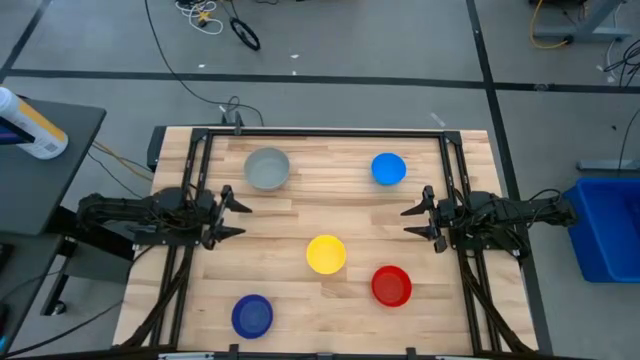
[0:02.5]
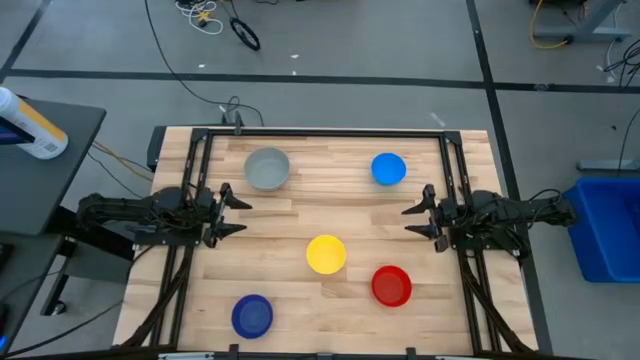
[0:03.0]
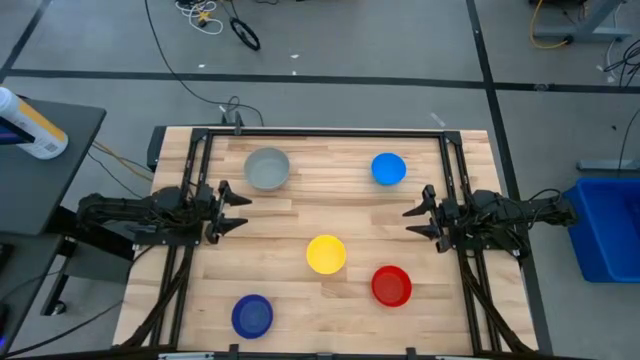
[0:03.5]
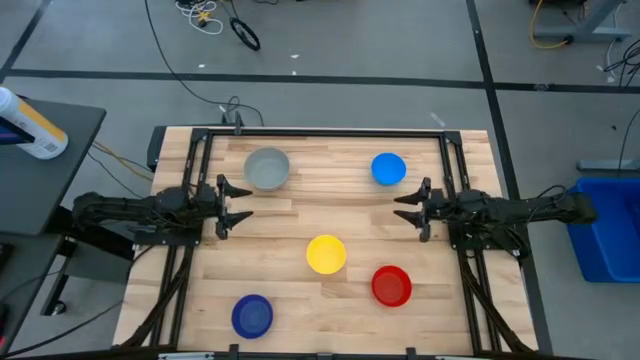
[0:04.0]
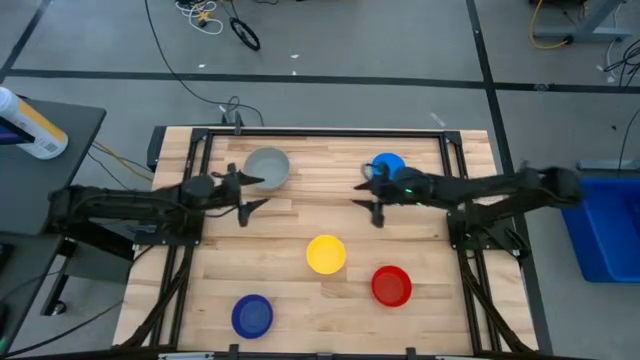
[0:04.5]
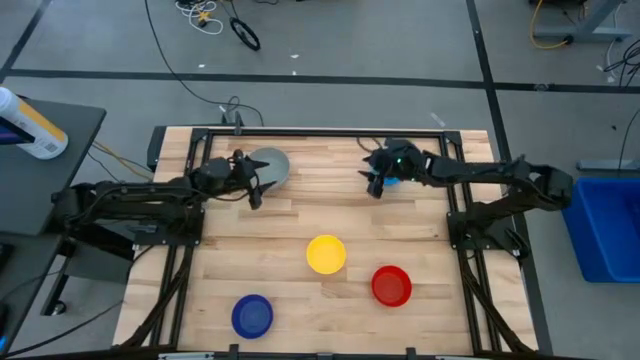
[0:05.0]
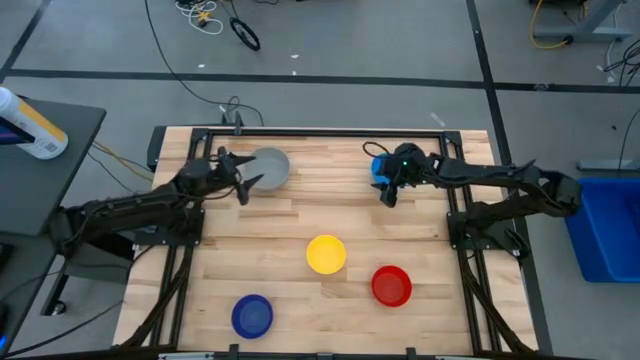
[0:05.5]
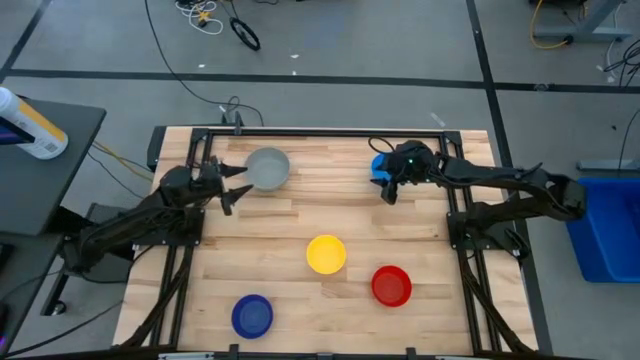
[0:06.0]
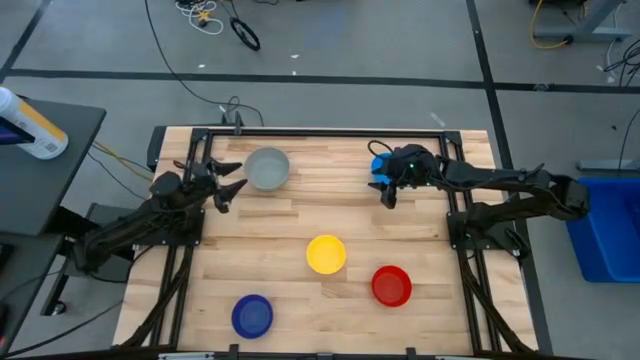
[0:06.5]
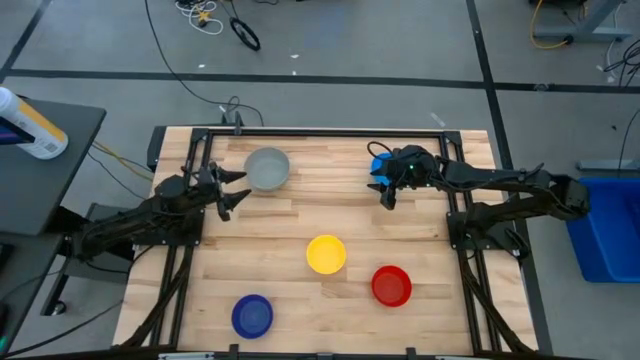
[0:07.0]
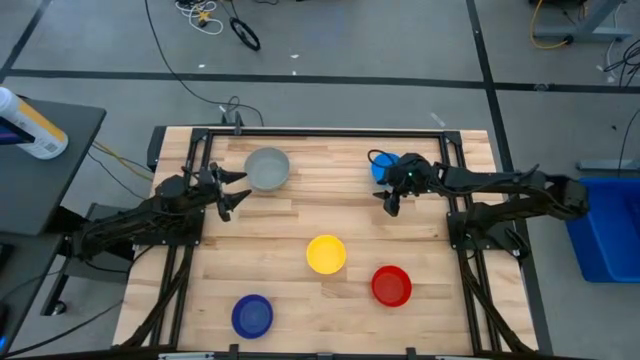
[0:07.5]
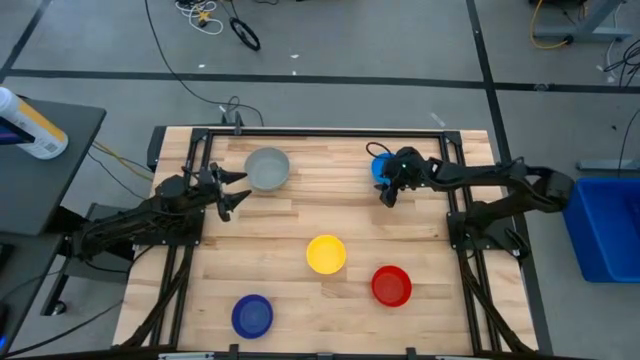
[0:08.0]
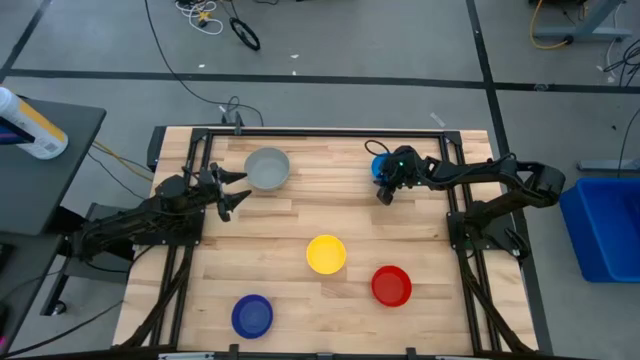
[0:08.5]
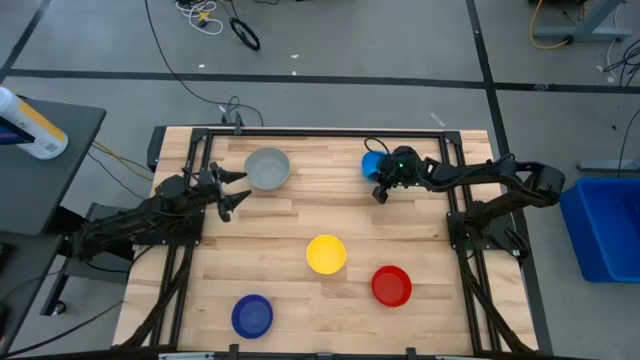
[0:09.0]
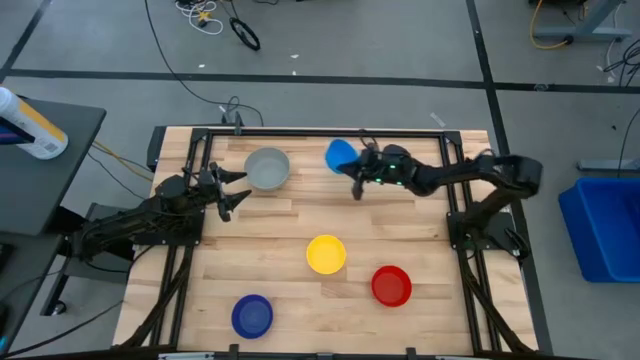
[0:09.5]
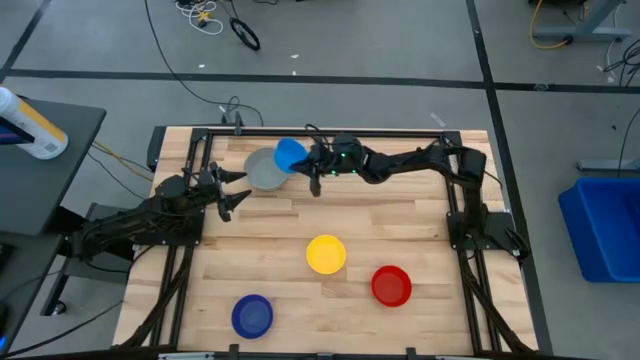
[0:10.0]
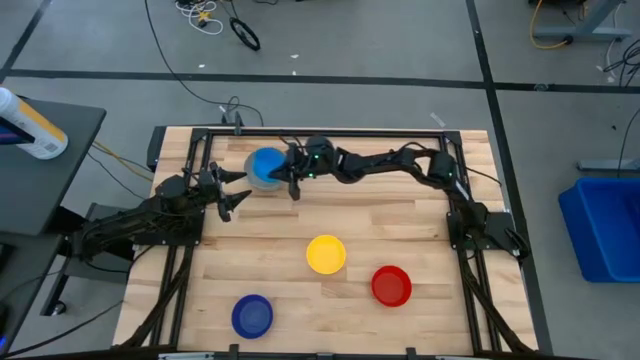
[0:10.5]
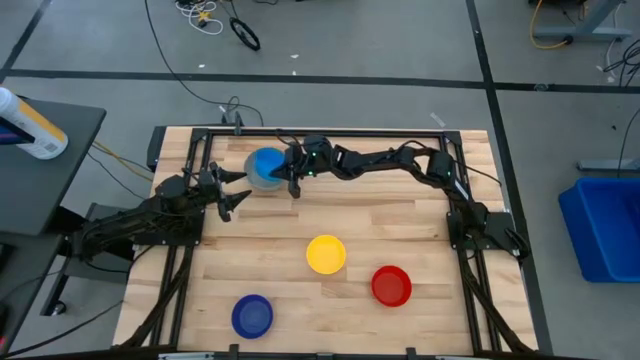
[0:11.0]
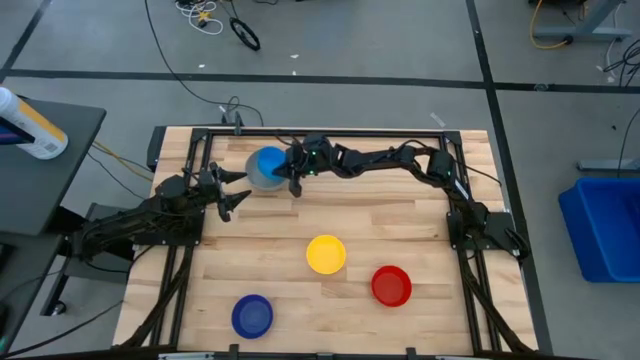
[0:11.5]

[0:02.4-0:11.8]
Stack the light blue bowl on the gray bowl

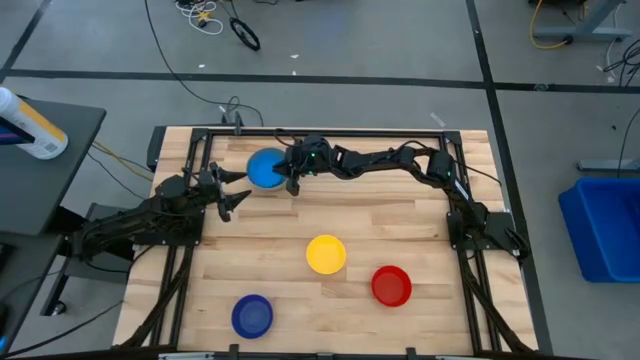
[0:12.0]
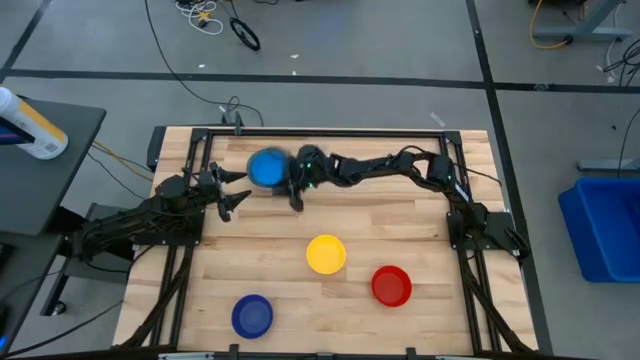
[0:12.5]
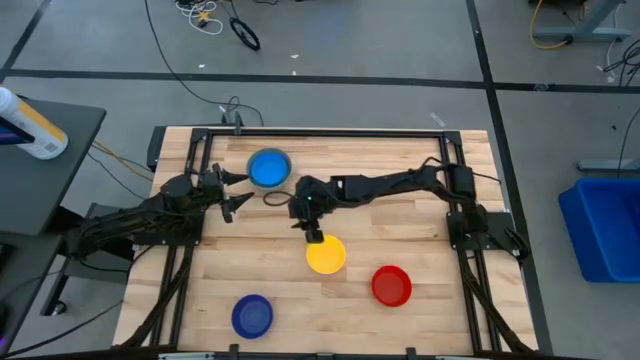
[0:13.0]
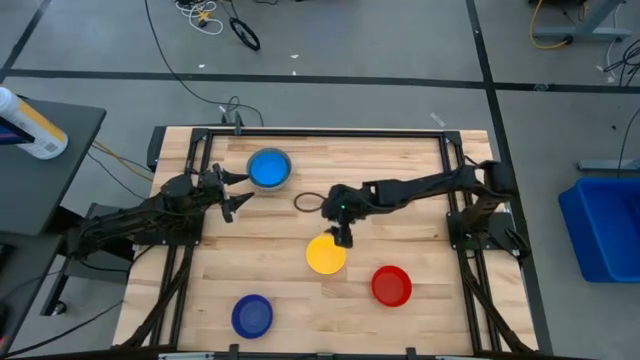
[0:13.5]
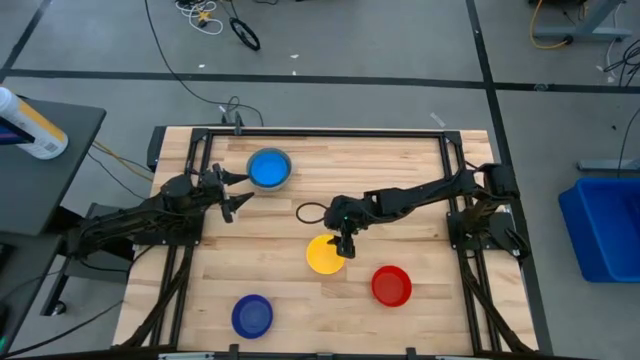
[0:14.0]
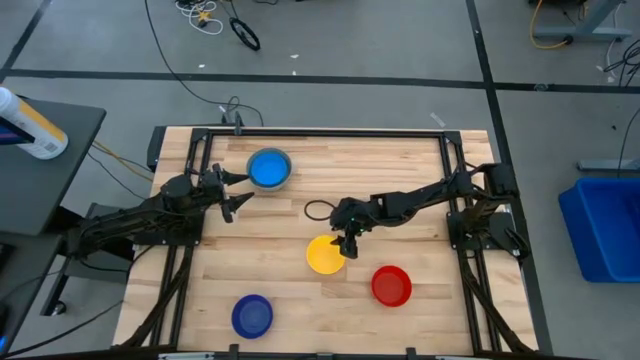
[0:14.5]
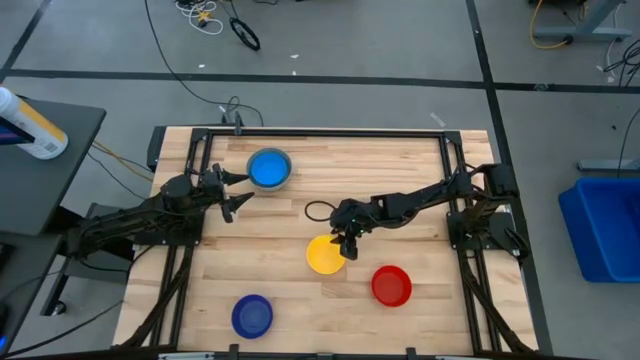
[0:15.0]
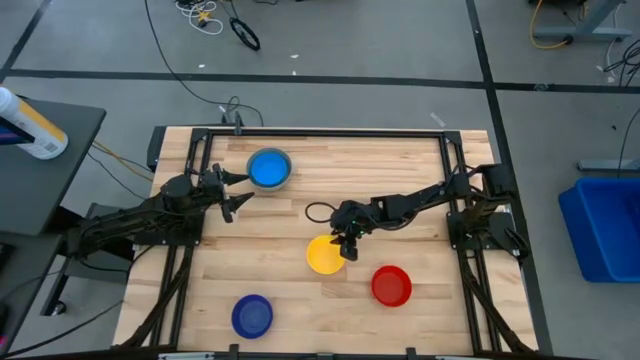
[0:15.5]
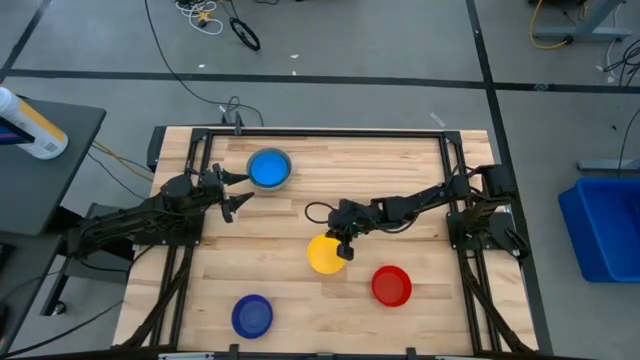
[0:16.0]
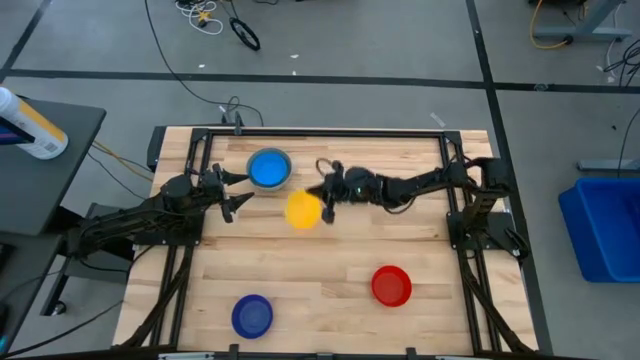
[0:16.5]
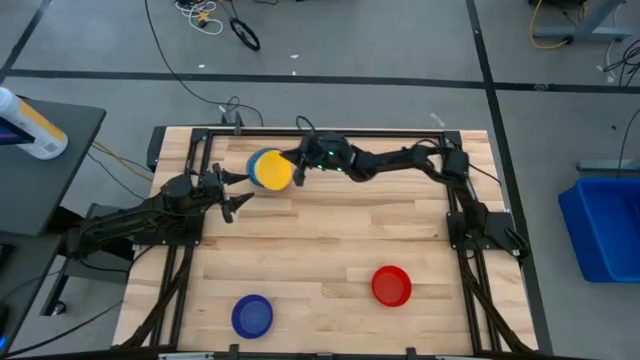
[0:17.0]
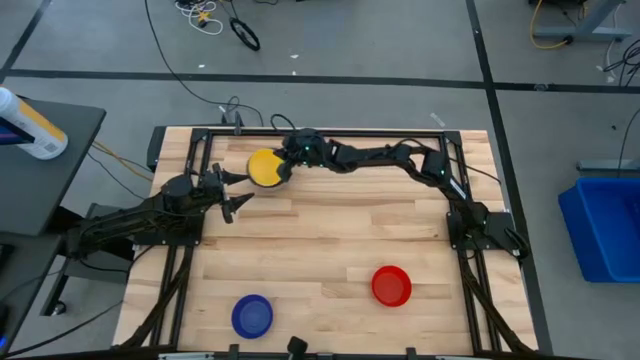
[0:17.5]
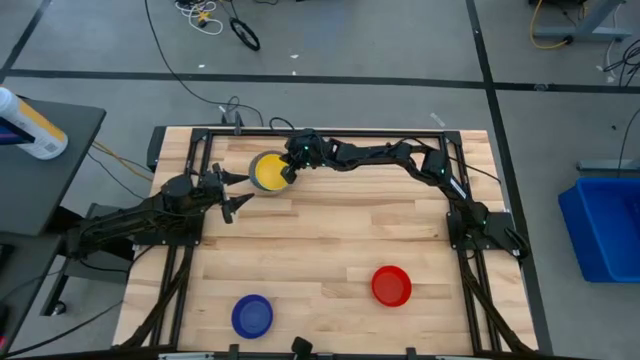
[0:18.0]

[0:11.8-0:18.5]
Stack the yellow bowl on the light blue bowl

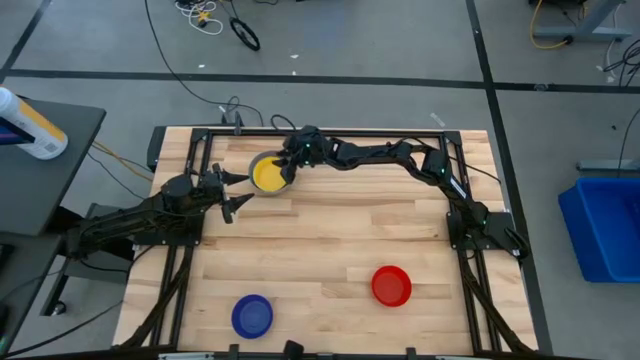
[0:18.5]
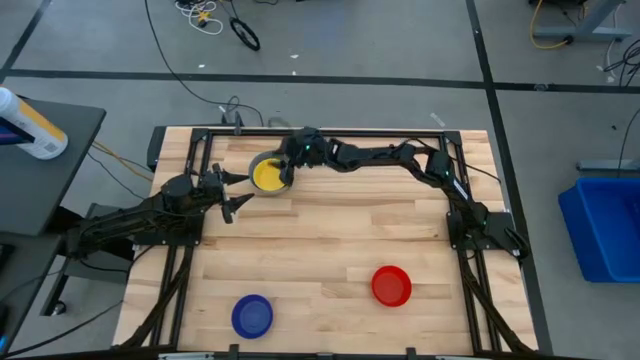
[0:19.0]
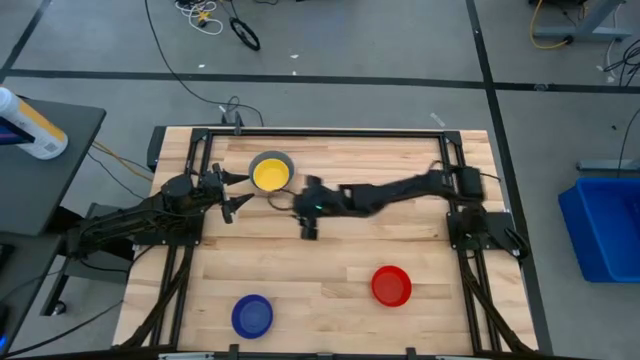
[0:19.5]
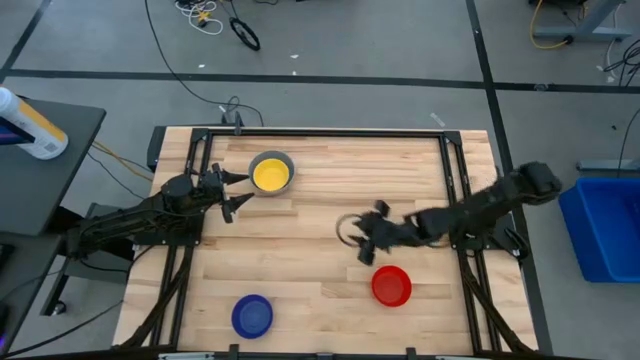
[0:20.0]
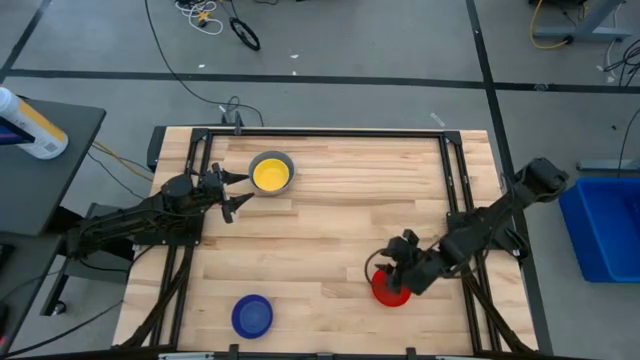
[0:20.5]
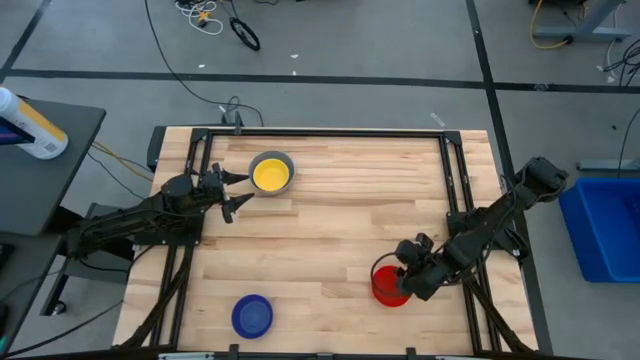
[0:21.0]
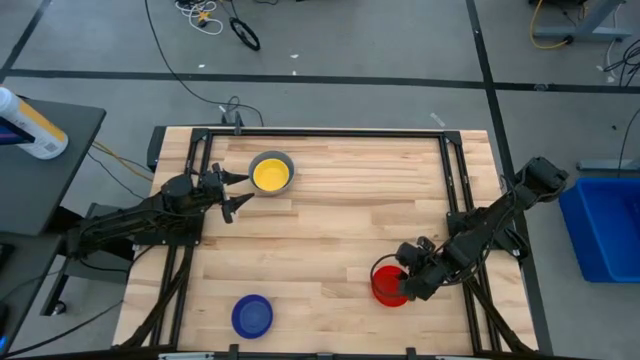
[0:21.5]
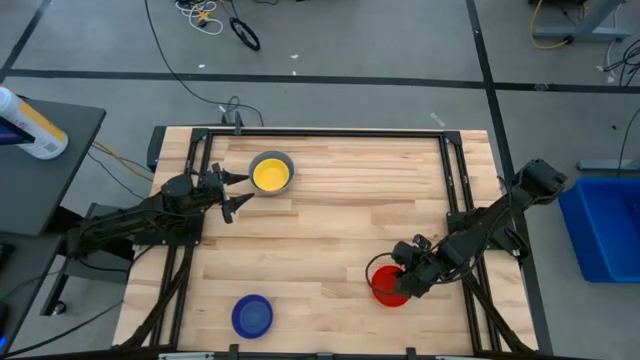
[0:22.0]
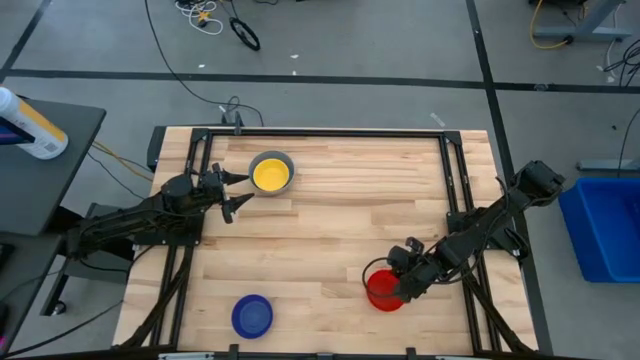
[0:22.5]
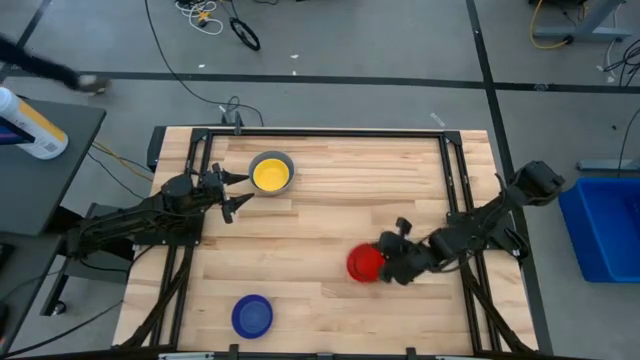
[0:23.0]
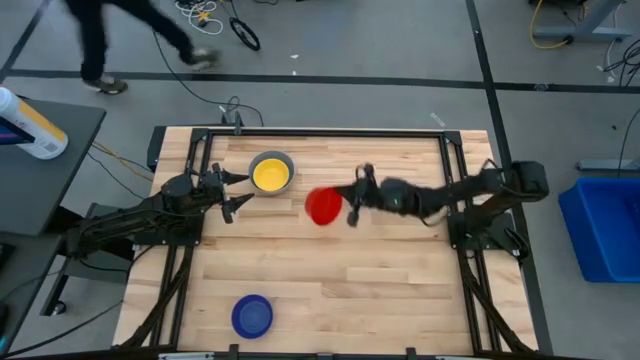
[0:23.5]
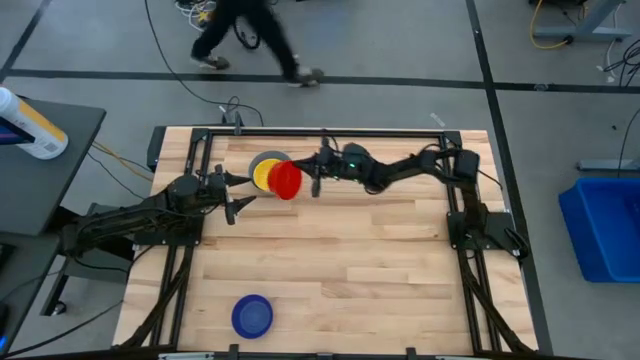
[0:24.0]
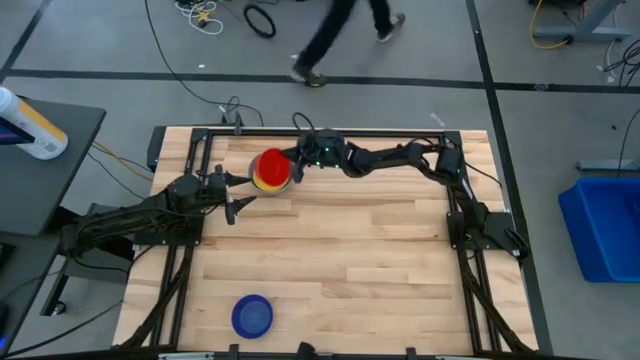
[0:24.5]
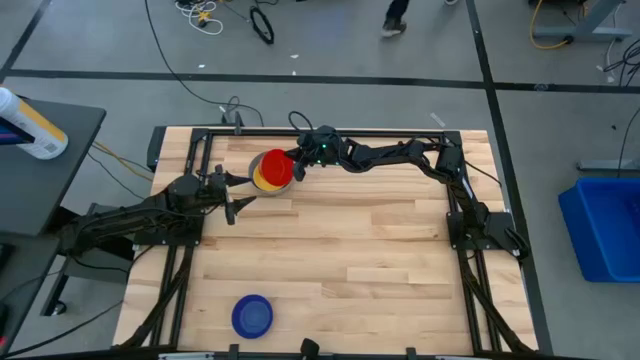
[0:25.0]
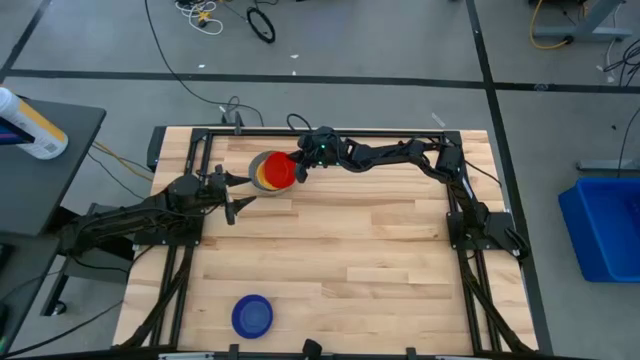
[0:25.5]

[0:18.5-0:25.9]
Stack the red bowl on the yellow bowl
